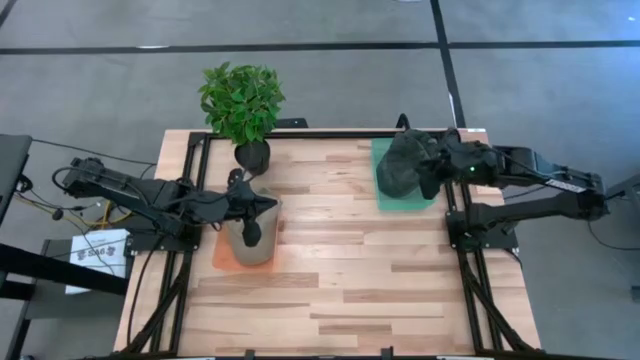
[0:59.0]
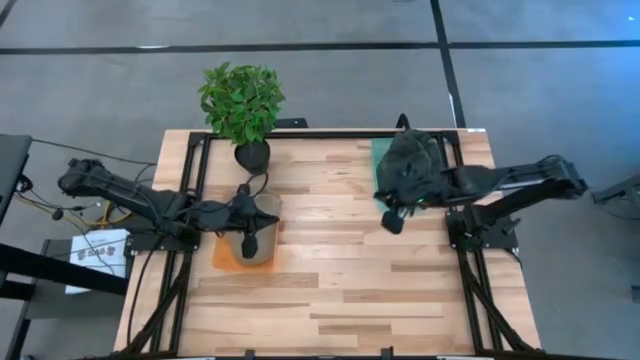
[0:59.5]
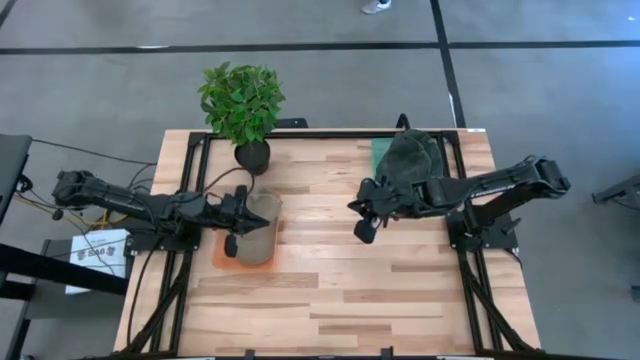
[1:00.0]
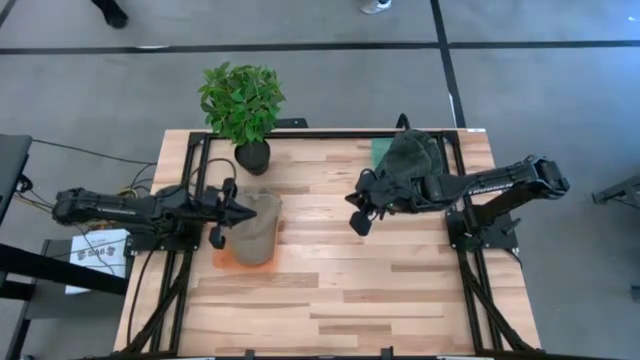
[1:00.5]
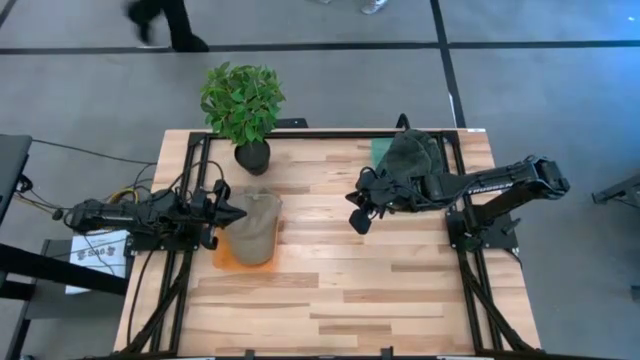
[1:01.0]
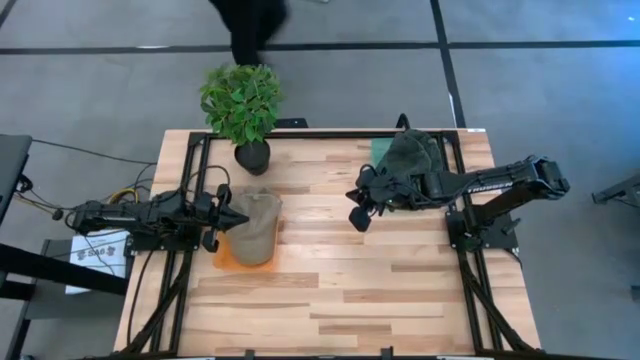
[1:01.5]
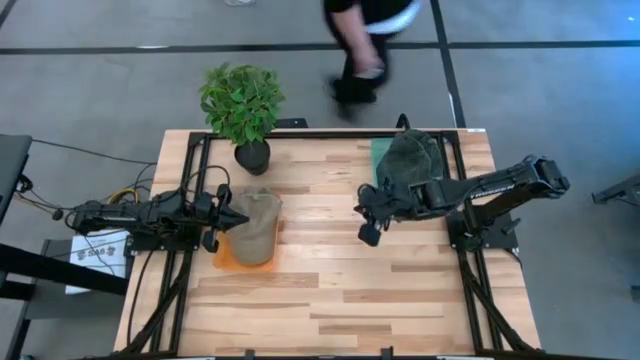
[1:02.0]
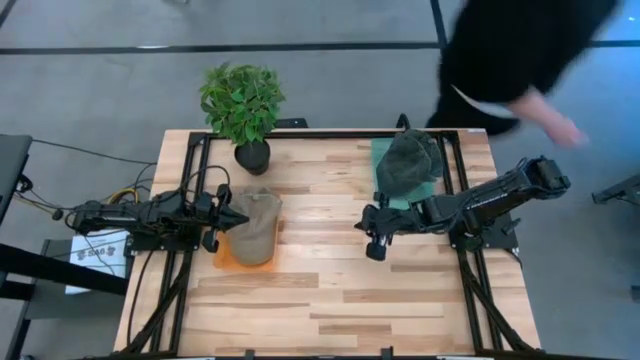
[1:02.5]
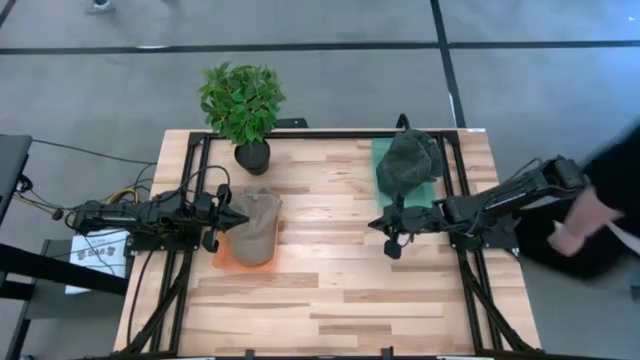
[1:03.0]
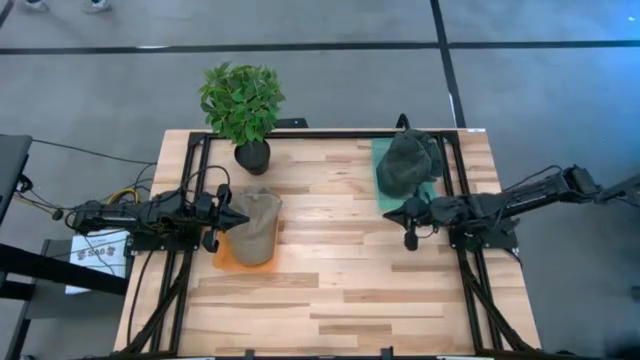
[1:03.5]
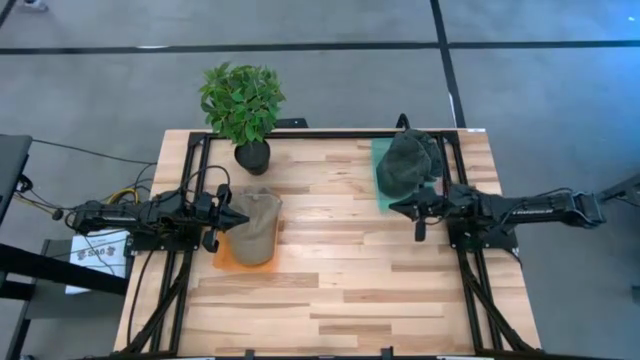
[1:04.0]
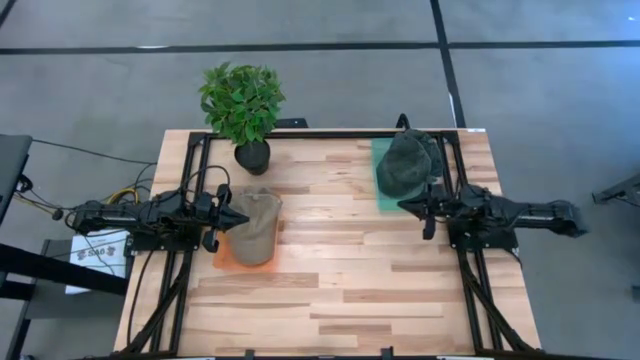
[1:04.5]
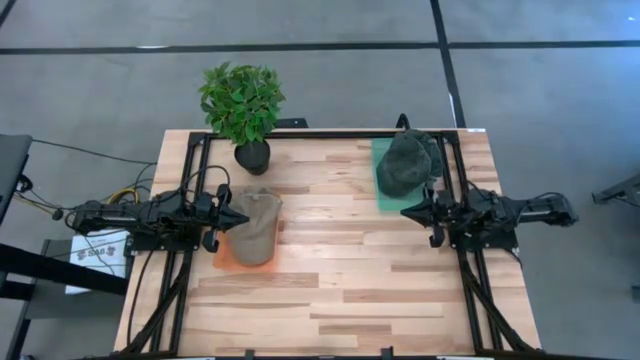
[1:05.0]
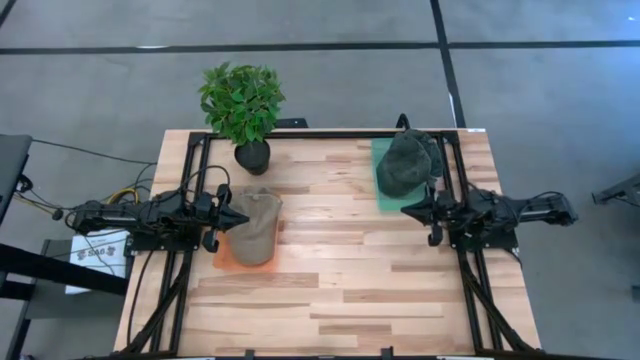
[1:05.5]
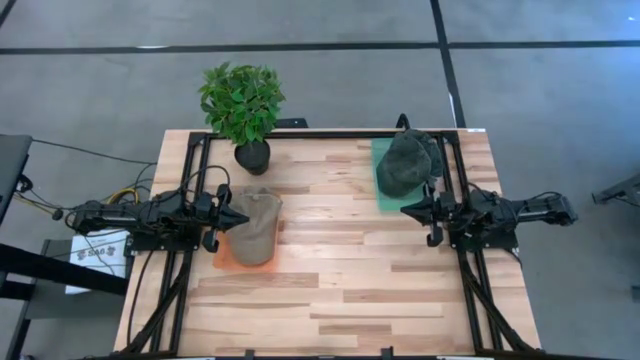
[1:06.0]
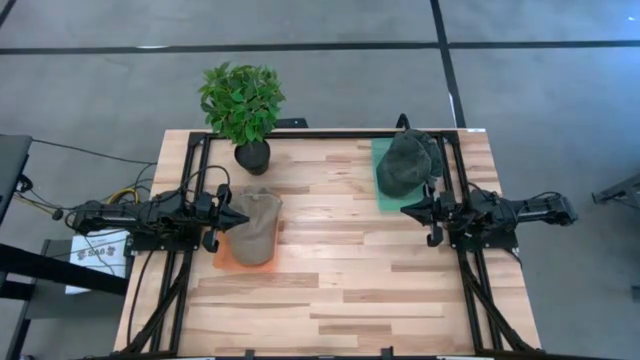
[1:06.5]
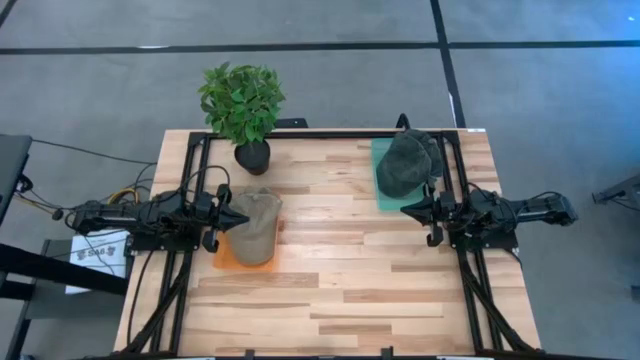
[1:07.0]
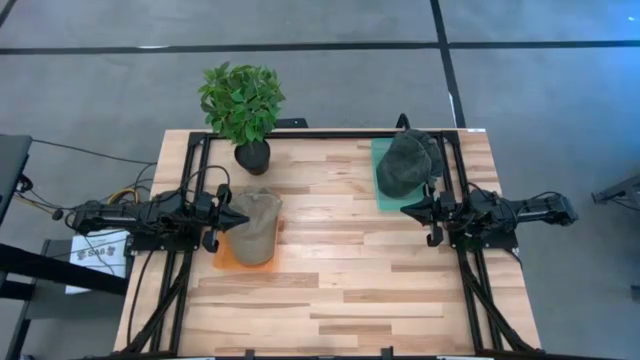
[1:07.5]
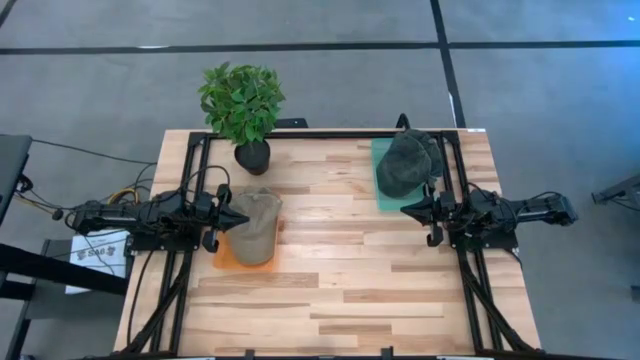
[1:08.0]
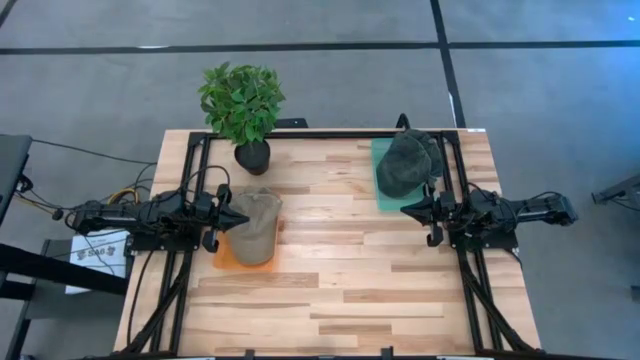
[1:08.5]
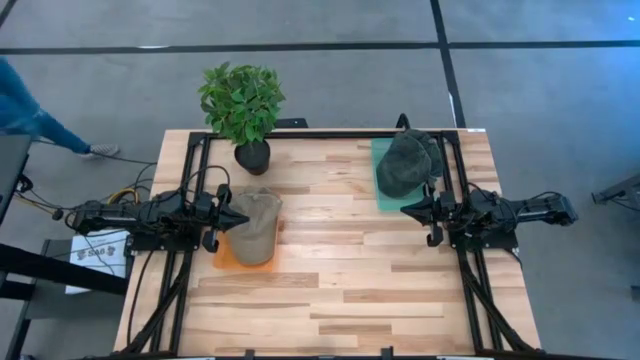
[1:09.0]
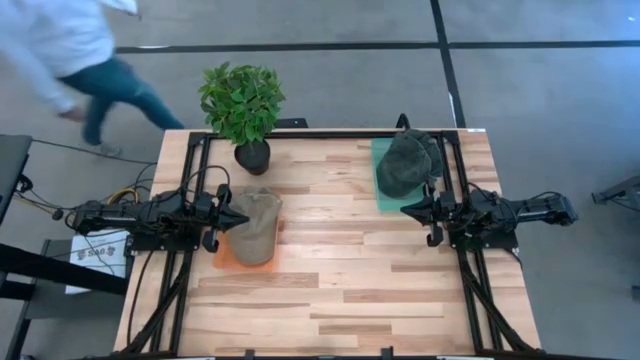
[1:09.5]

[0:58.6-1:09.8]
Task: Pick & Place hat
Return to Home Position

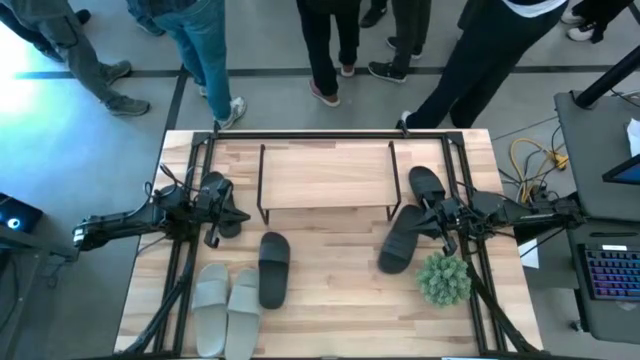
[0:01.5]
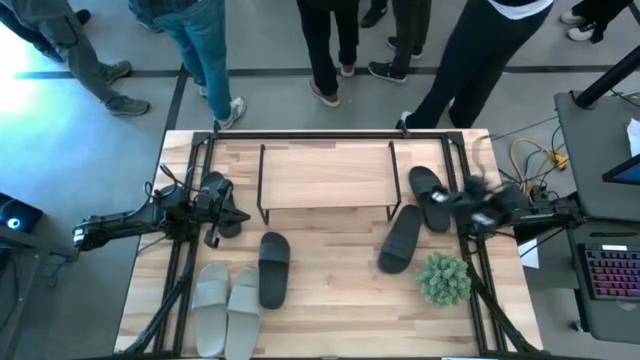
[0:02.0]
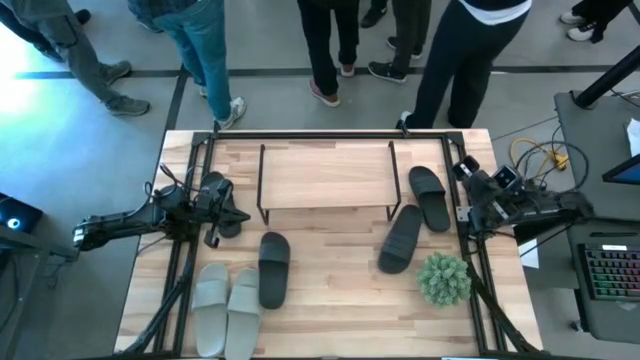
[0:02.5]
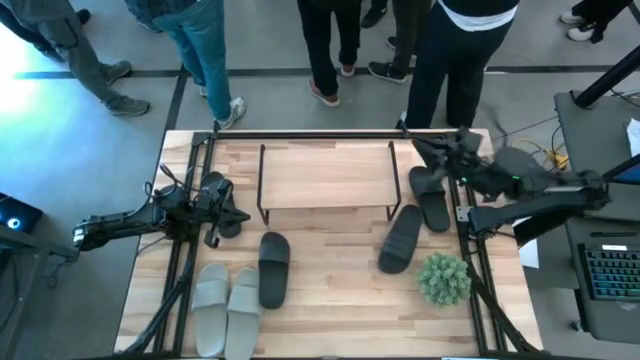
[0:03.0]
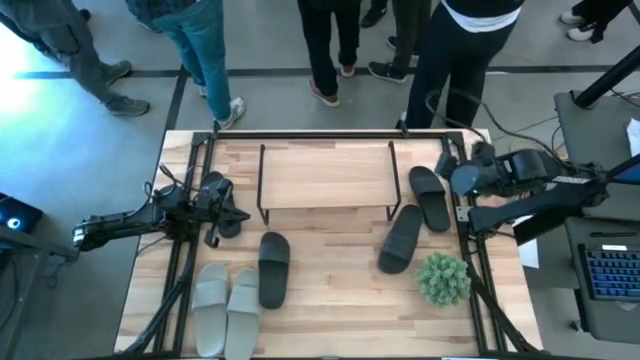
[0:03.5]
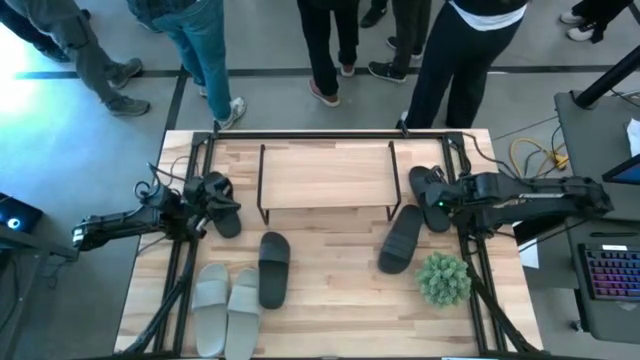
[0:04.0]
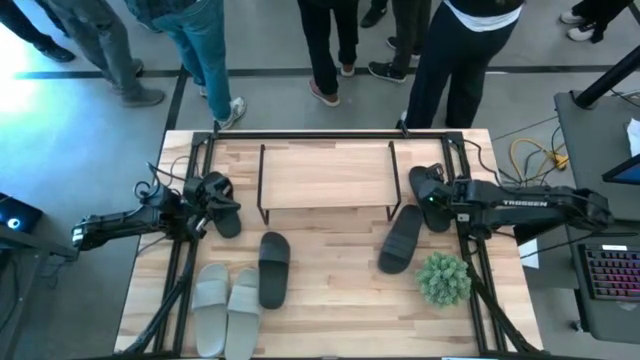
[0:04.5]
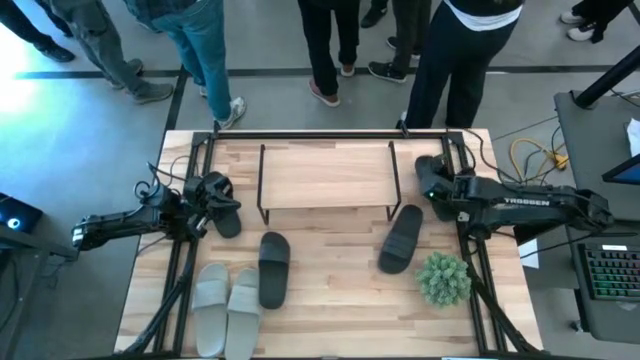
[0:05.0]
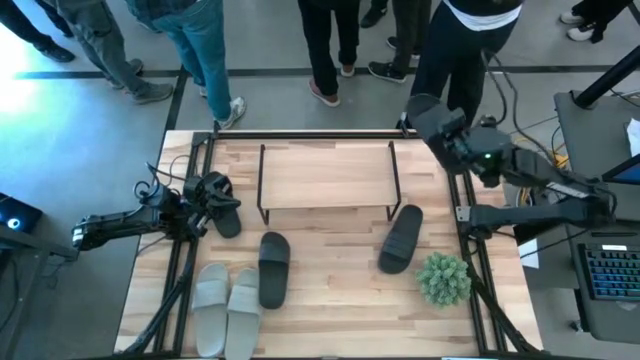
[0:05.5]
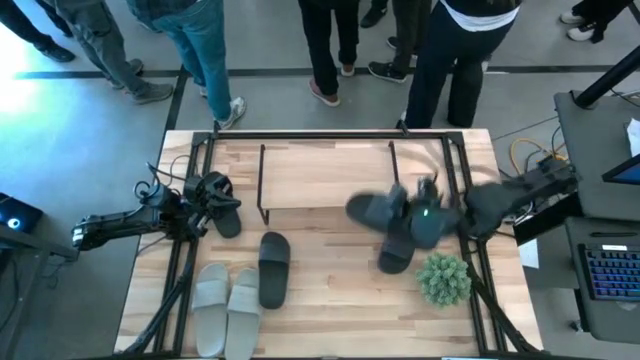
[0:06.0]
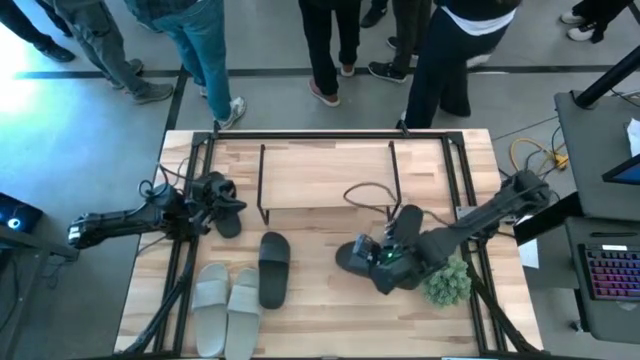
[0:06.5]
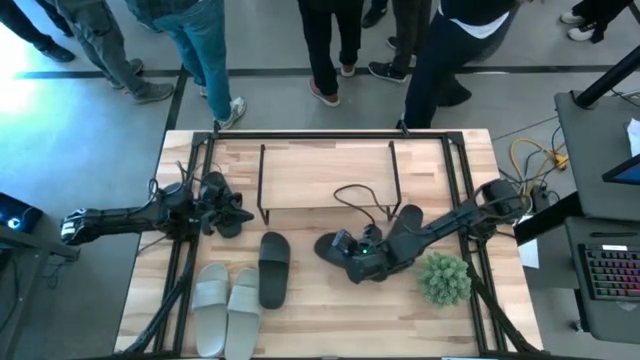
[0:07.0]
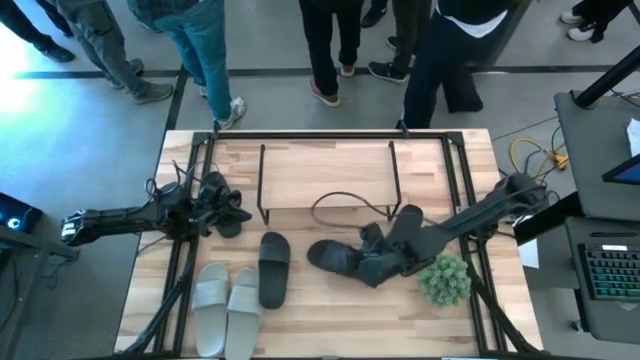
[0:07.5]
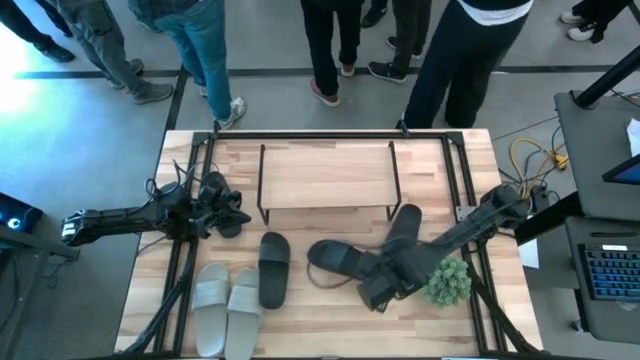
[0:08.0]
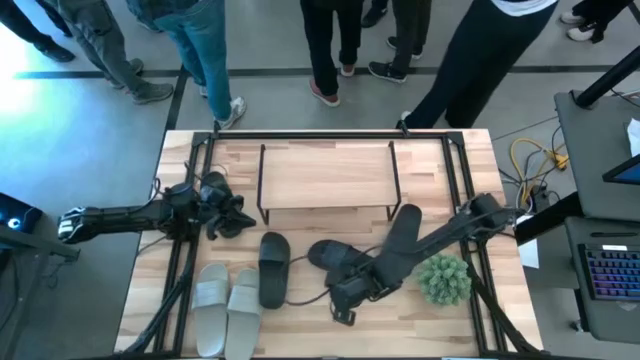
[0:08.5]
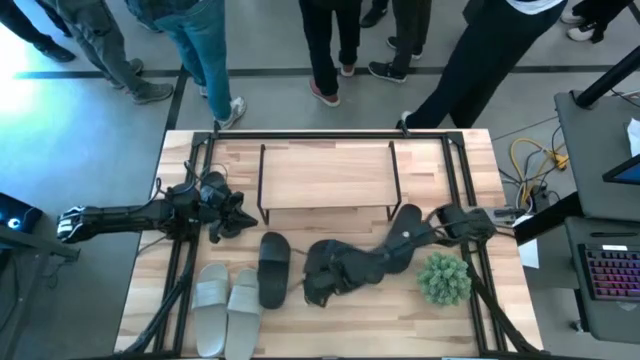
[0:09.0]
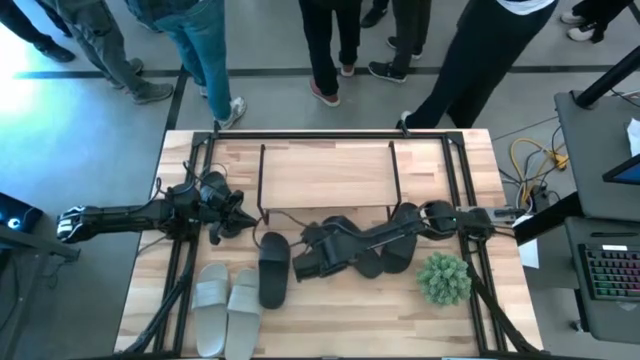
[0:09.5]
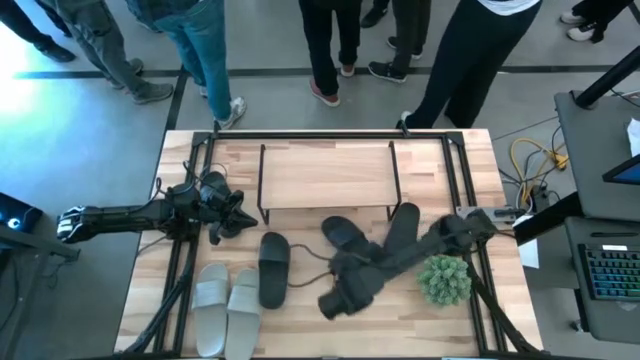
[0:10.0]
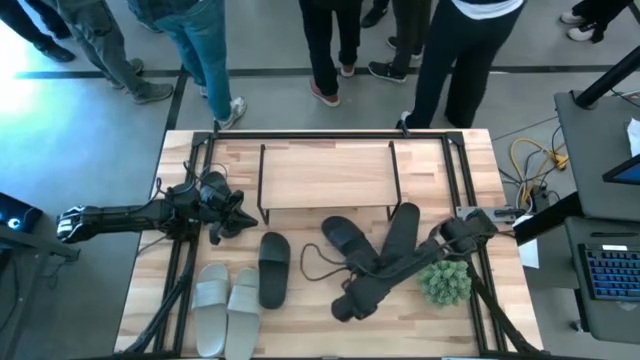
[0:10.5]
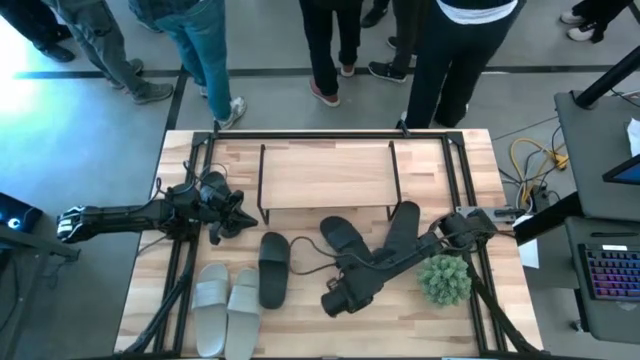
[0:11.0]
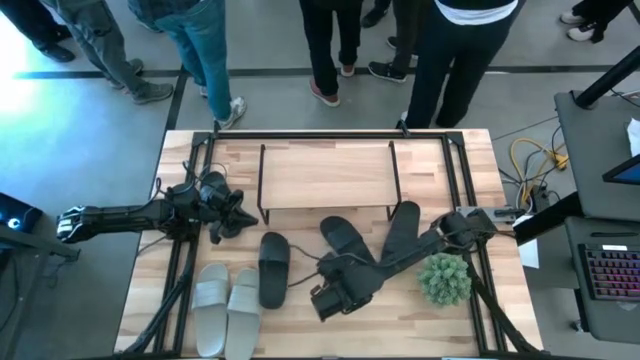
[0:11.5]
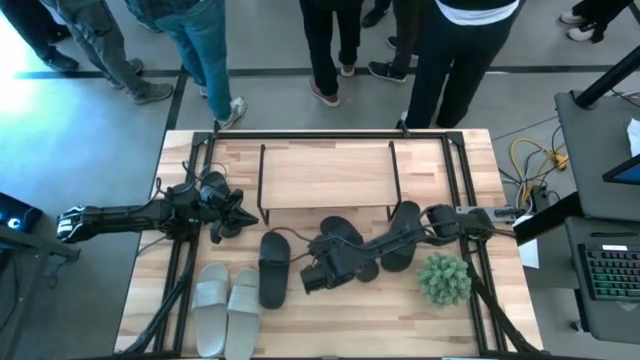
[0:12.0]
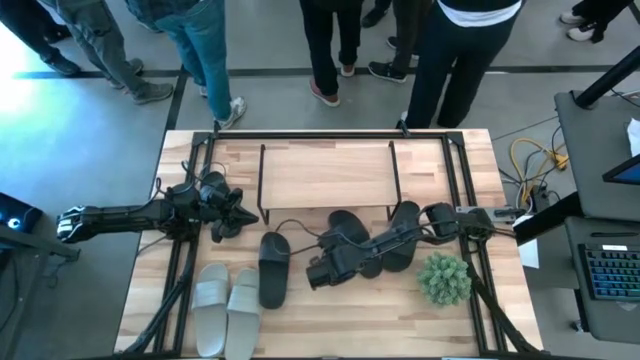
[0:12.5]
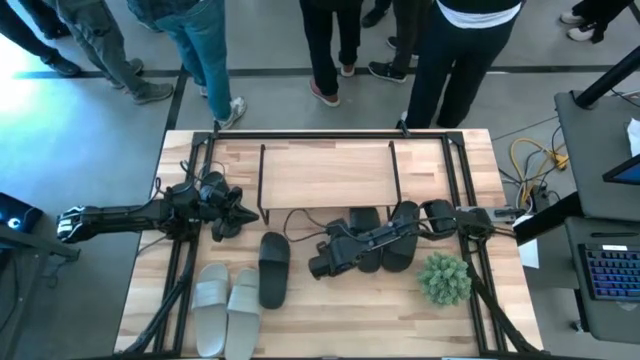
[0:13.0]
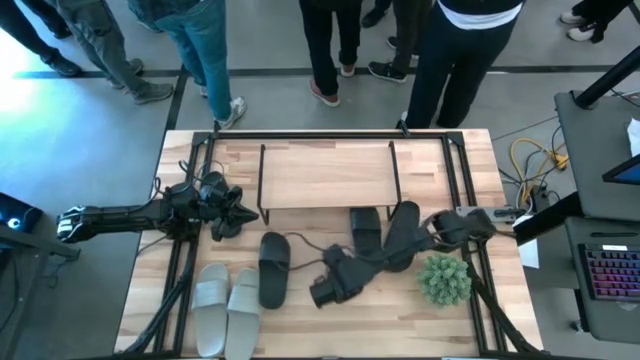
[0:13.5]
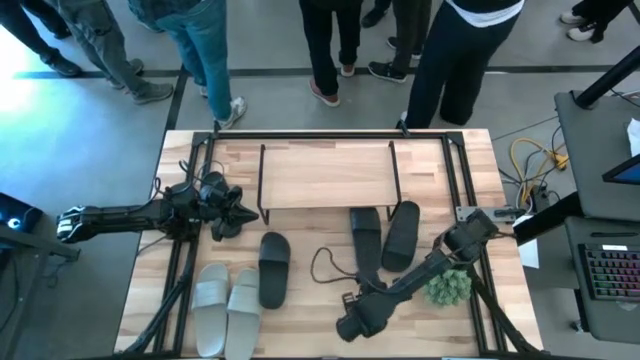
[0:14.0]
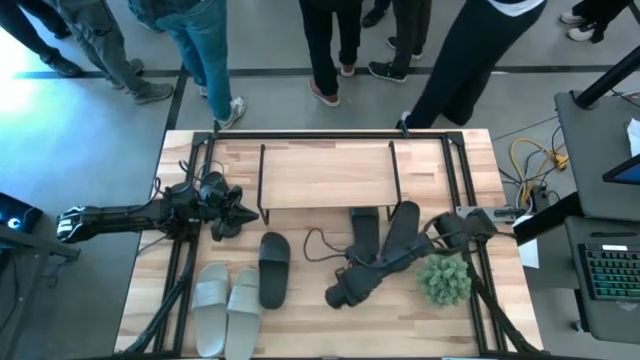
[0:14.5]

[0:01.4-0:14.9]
Task: Pick and place slides into the shelf
Put the top right black slide under the shelf
